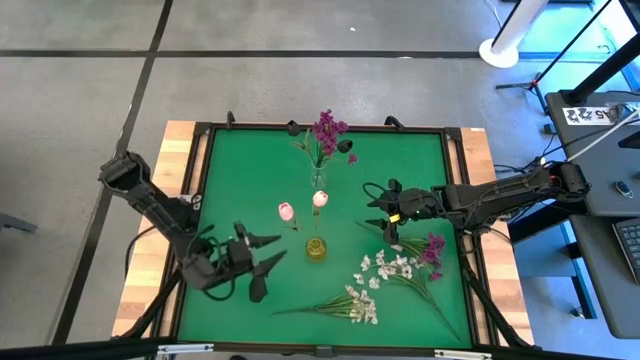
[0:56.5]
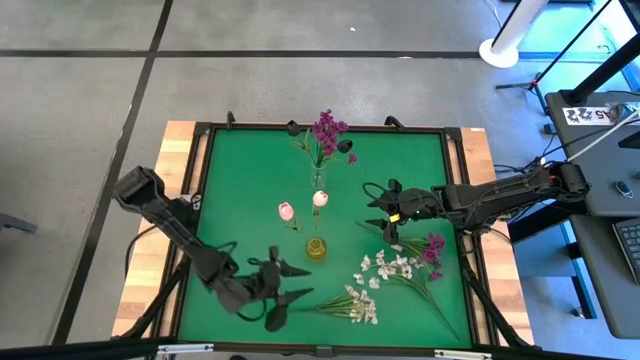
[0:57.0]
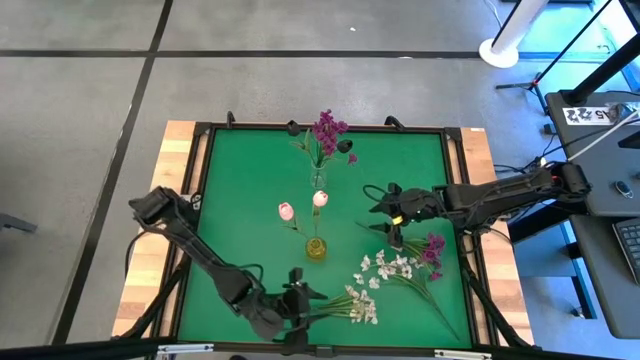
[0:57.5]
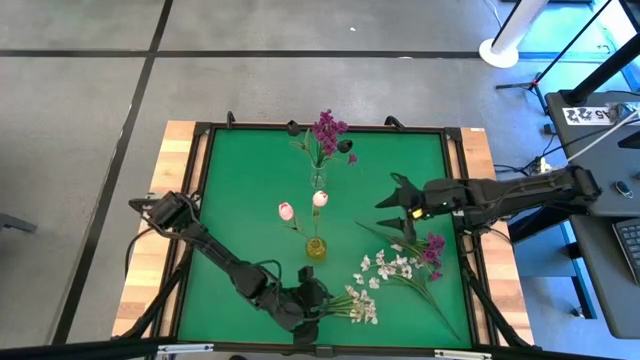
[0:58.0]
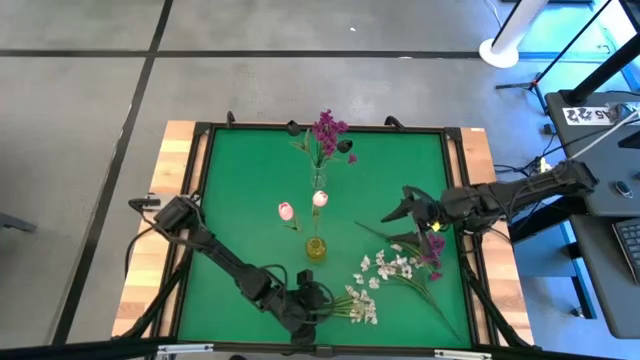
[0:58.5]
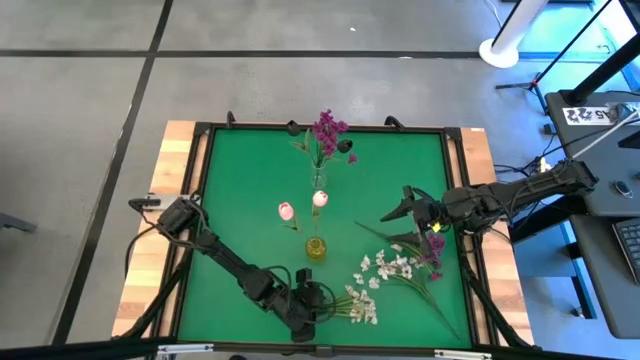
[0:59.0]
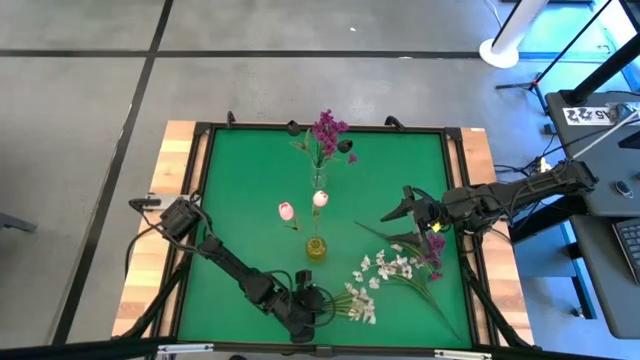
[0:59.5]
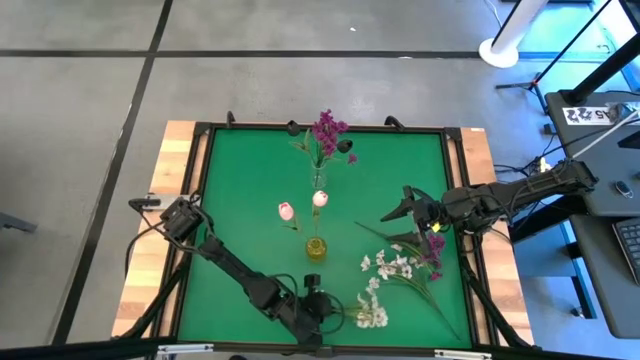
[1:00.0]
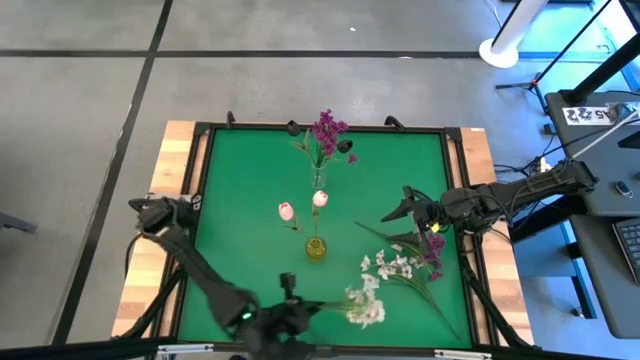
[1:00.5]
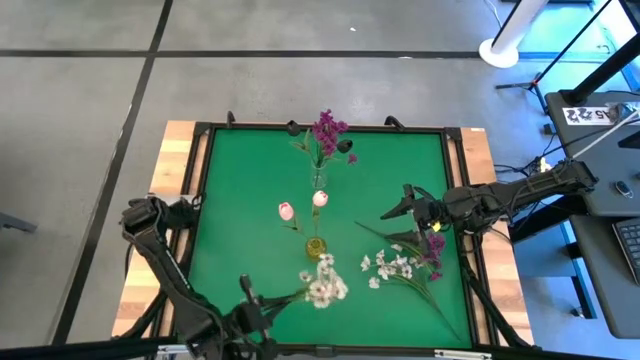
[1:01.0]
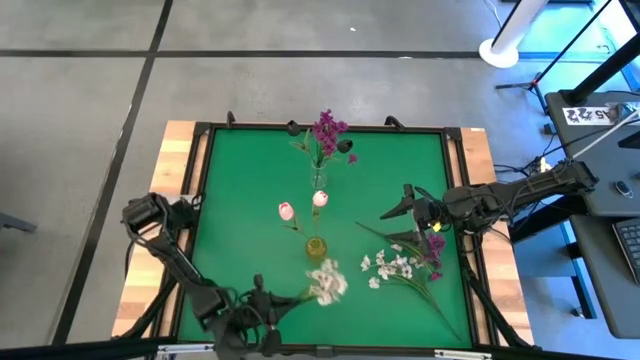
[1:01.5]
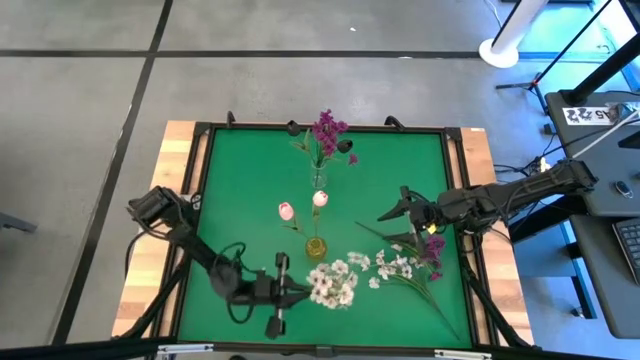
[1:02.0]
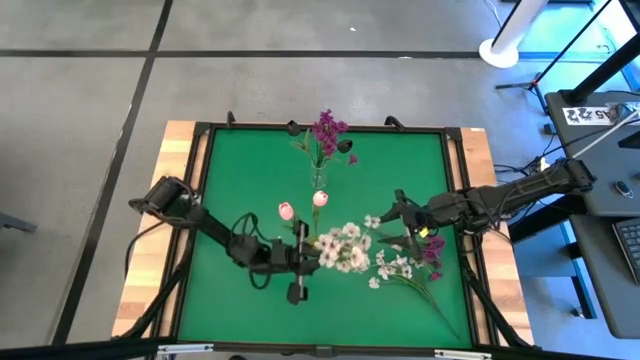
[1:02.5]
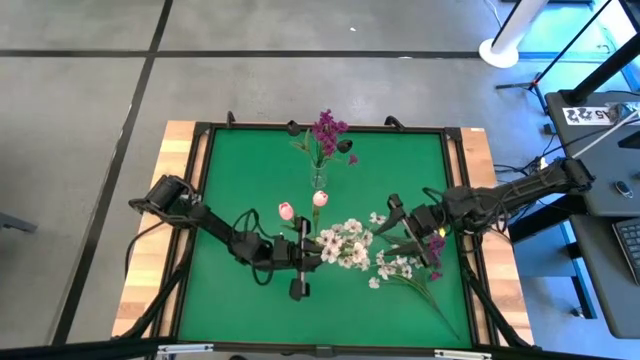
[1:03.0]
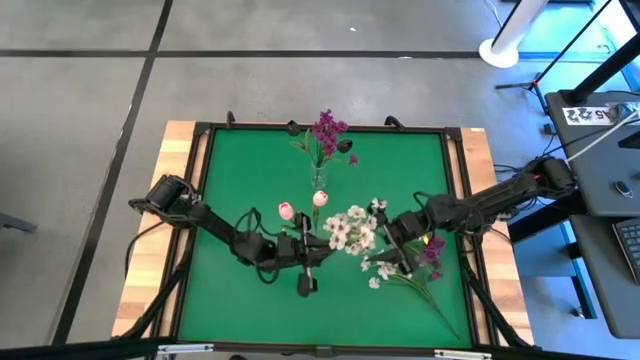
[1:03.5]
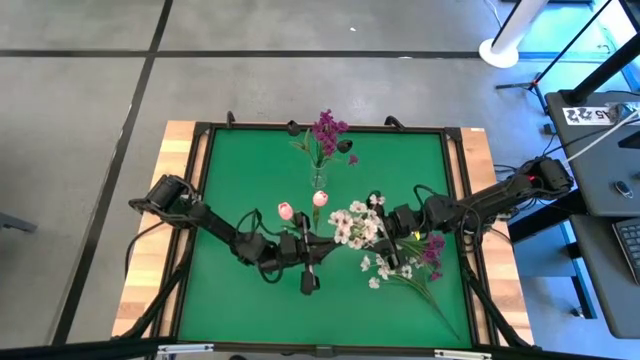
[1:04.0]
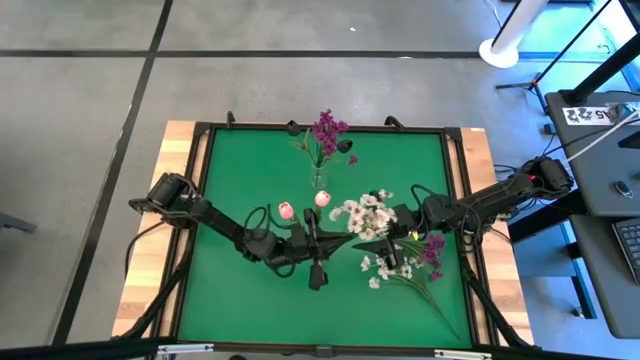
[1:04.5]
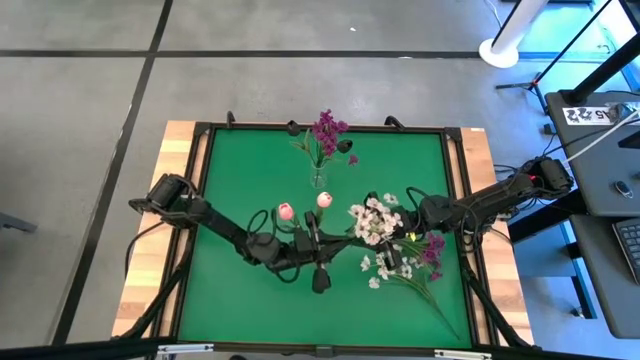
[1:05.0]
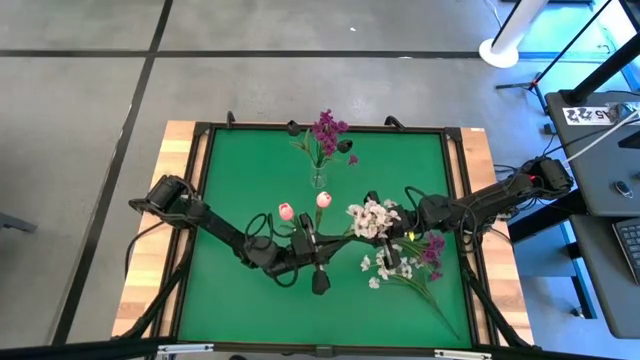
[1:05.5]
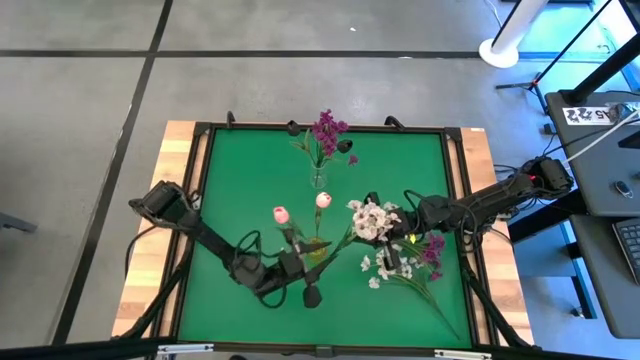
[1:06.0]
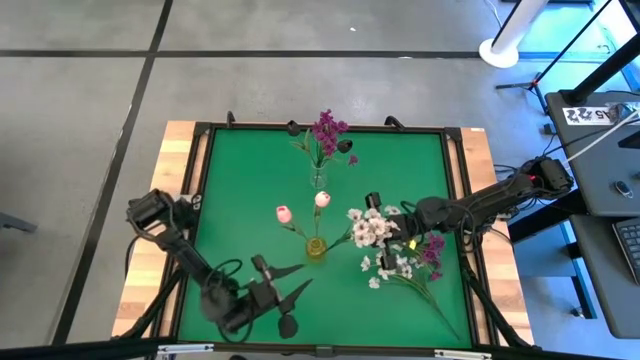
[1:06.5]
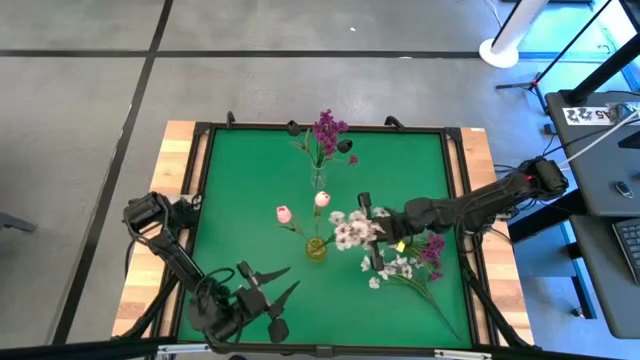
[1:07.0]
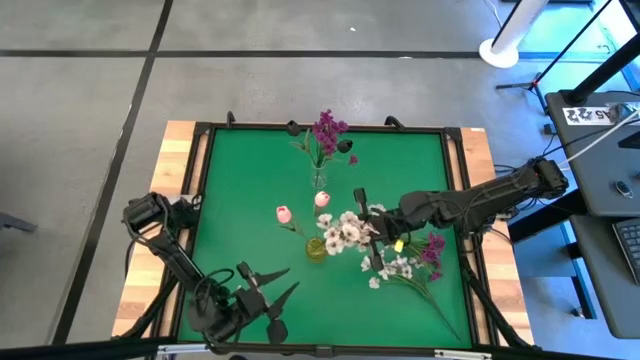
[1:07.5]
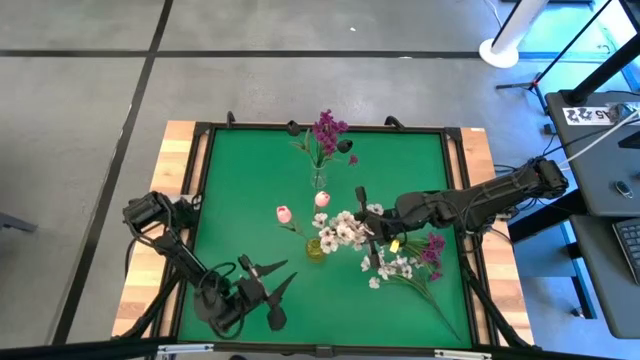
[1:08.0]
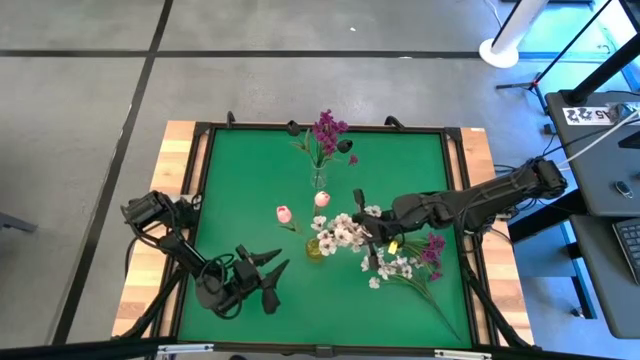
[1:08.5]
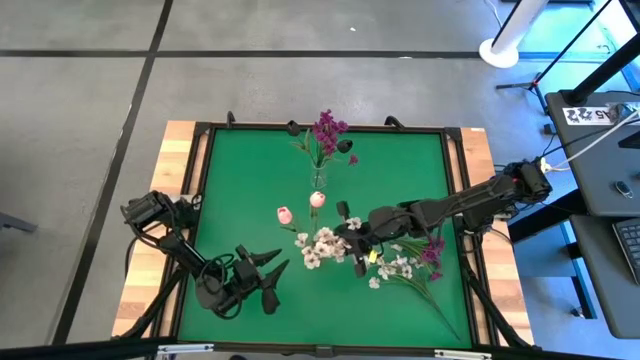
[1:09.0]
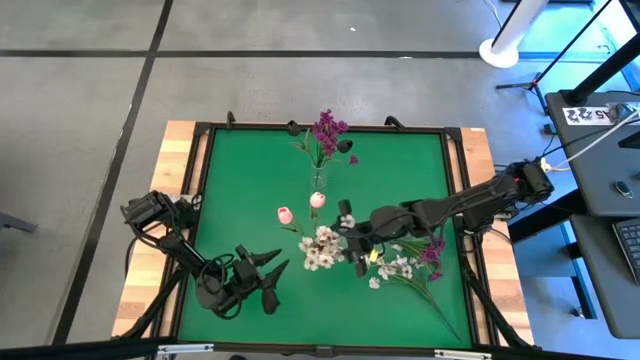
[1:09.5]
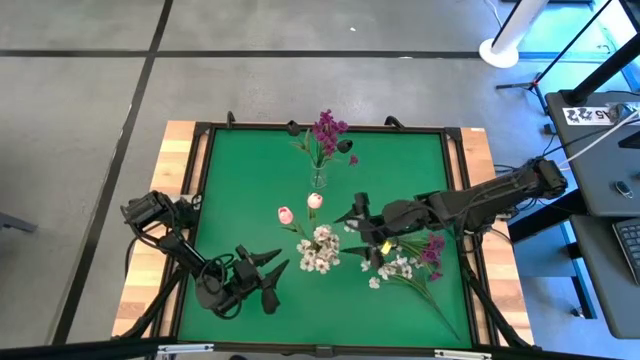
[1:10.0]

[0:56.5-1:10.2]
Task: Sort flowers into vase by color
Put the bottom white flower into the yellow vase

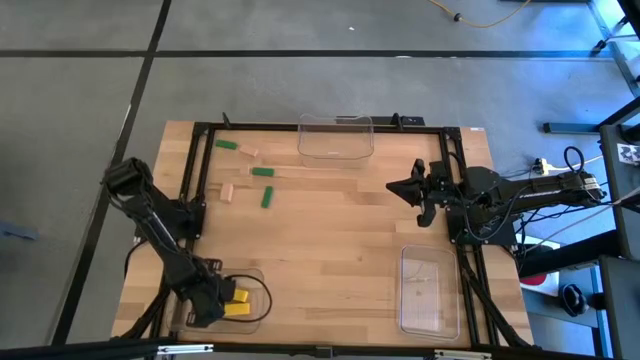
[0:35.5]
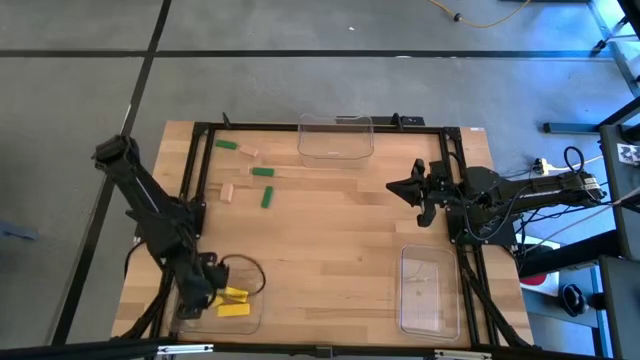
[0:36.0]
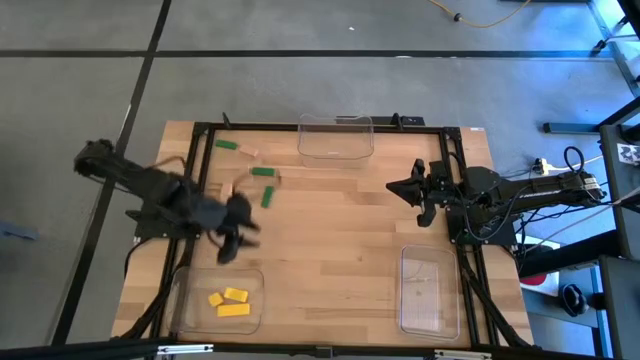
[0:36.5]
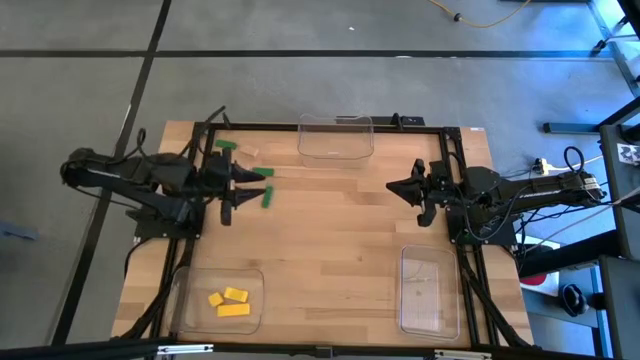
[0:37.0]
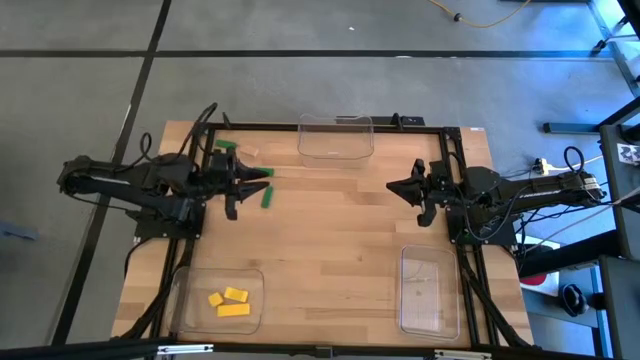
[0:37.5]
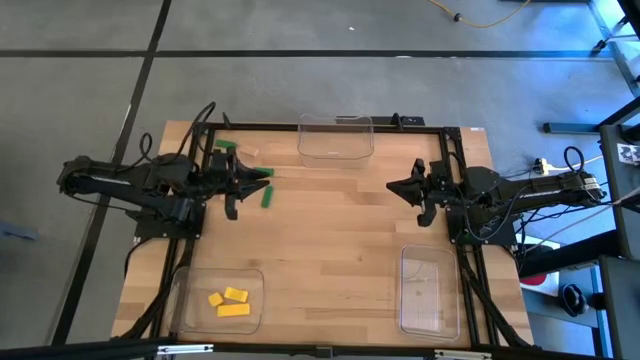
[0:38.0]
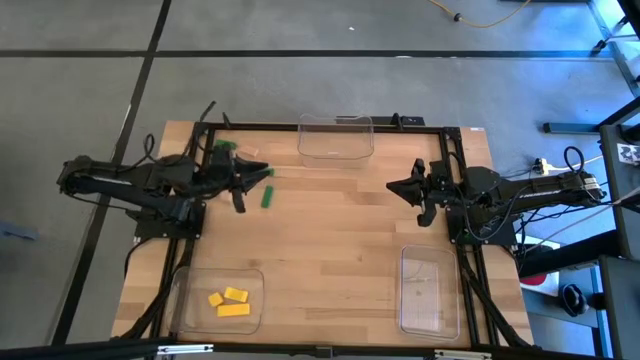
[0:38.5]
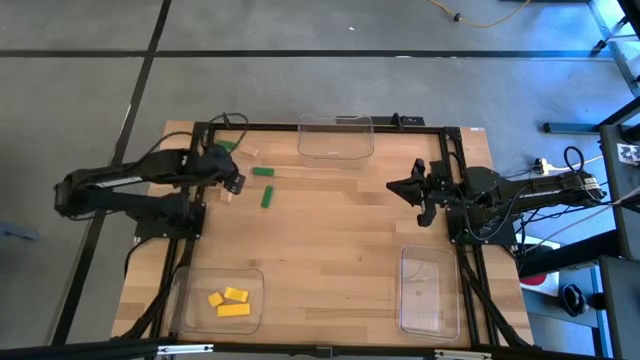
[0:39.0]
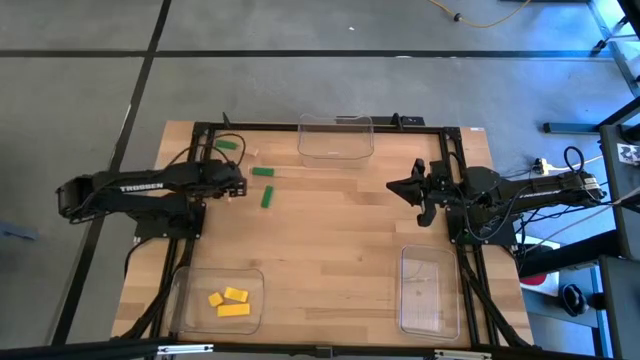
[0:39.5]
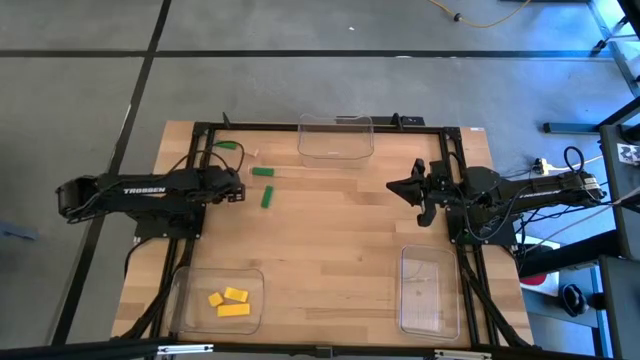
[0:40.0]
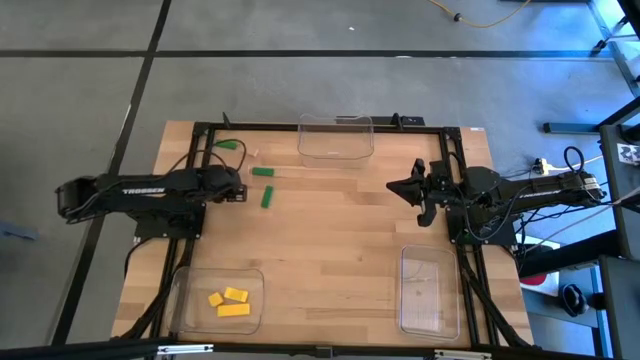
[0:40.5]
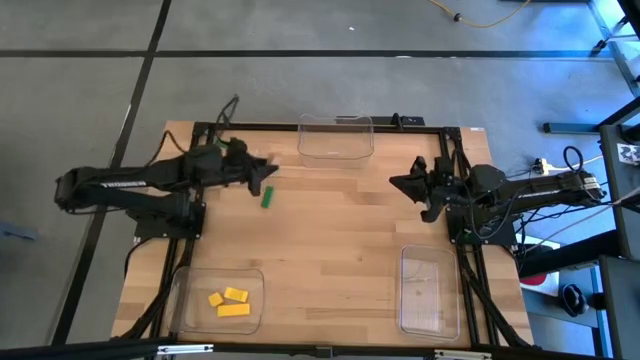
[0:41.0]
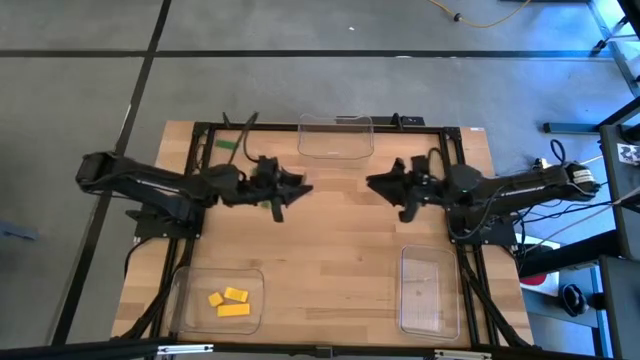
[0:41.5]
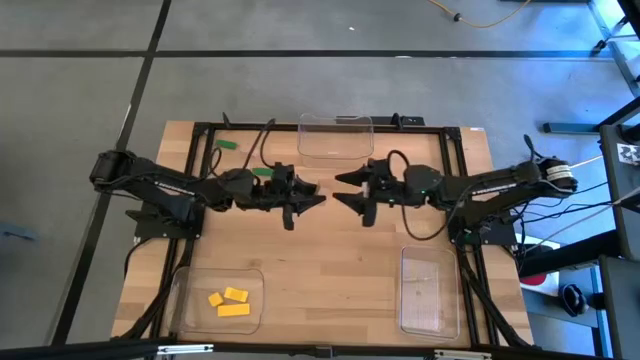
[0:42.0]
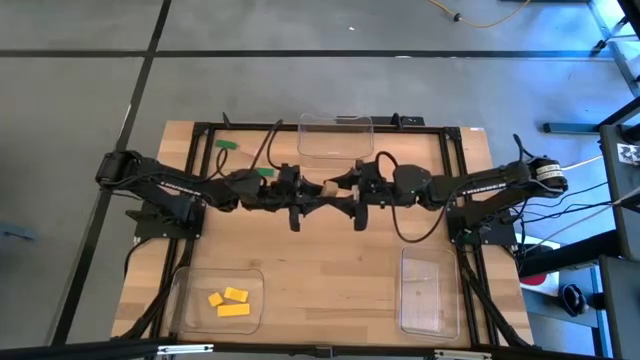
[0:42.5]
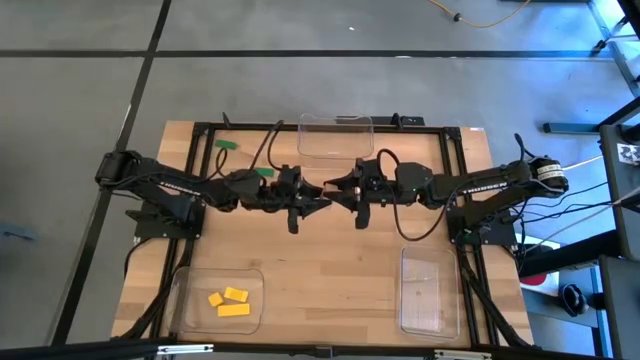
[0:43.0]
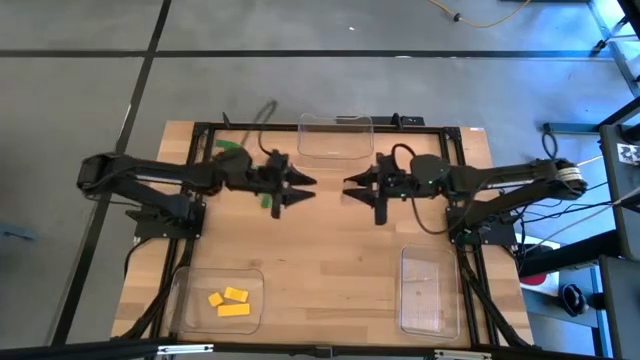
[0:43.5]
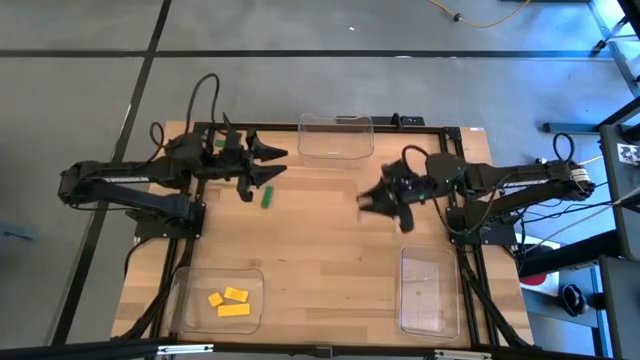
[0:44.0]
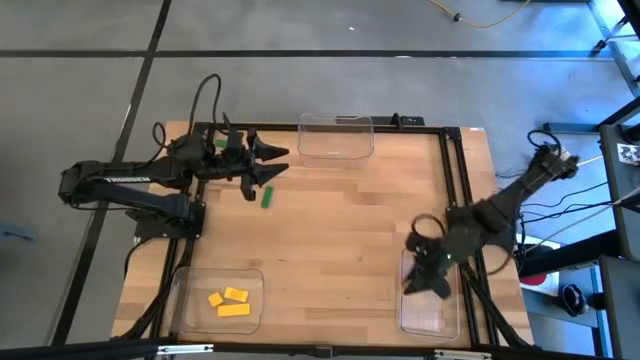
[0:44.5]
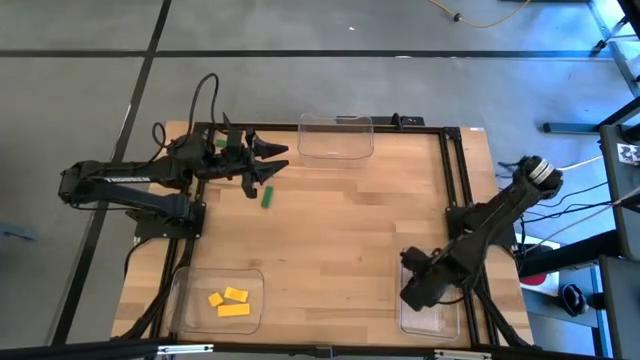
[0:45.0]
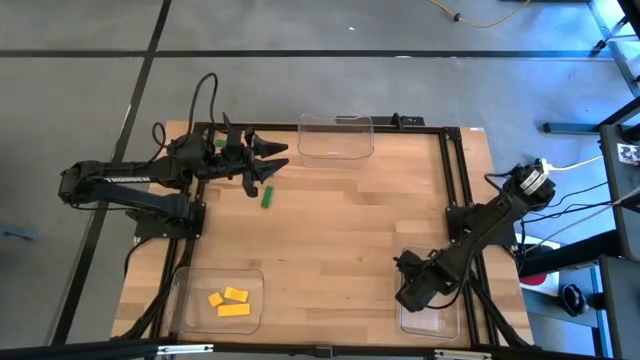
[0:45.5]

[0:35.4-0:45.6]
Task: Sort & place blocks by color
Put the bottom light brown block into the bottom right transparent bin
